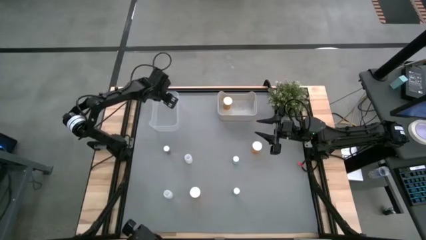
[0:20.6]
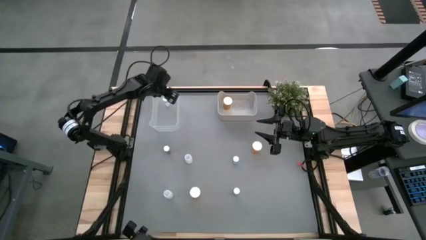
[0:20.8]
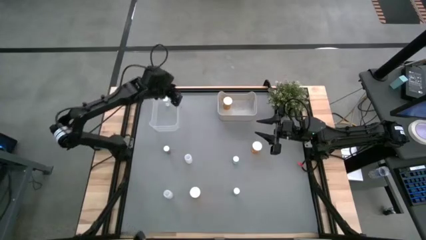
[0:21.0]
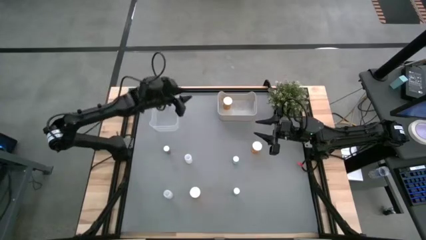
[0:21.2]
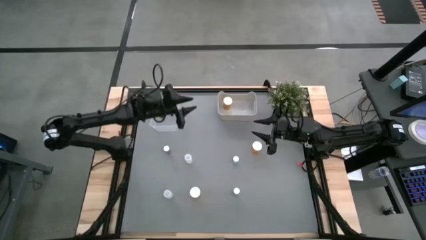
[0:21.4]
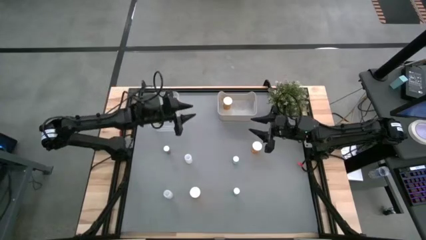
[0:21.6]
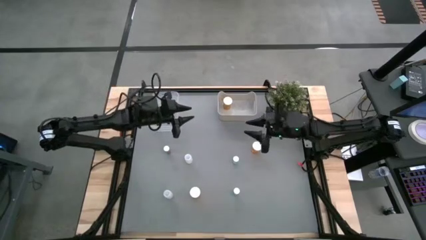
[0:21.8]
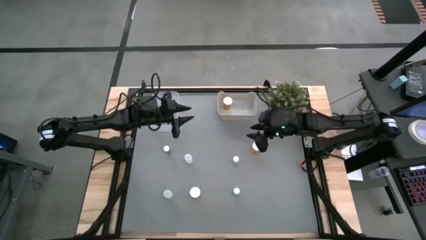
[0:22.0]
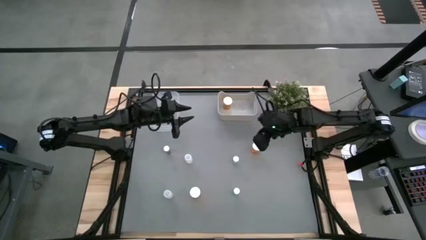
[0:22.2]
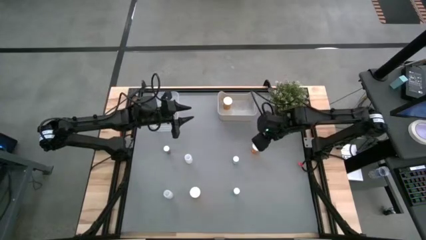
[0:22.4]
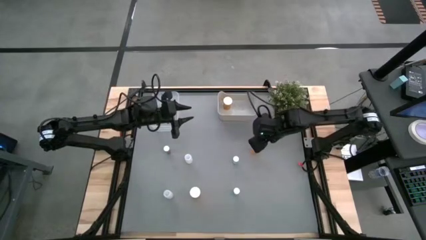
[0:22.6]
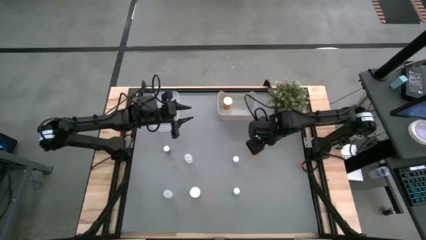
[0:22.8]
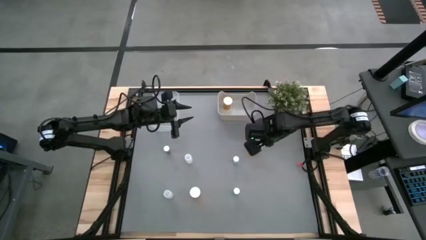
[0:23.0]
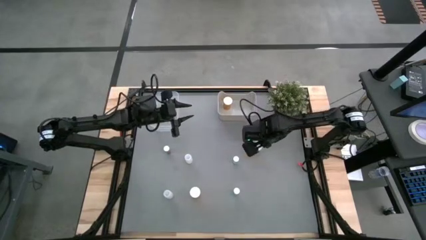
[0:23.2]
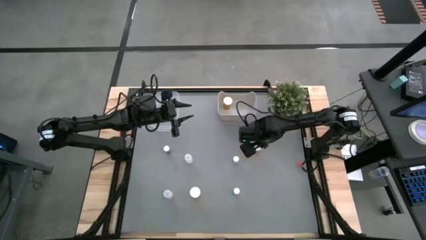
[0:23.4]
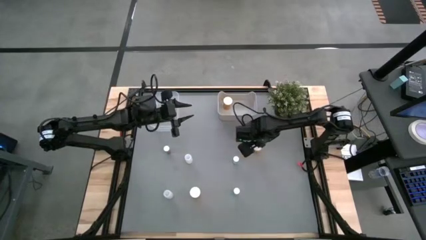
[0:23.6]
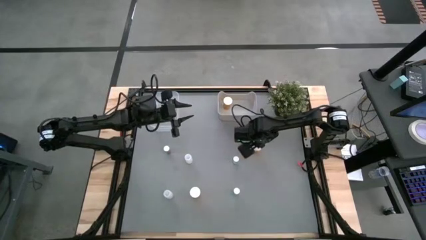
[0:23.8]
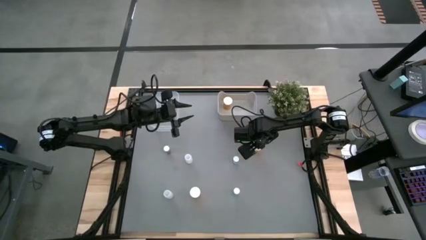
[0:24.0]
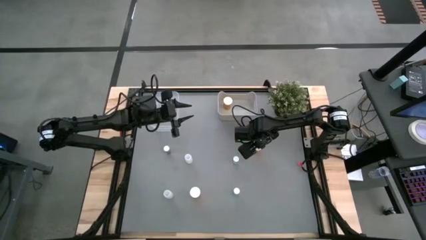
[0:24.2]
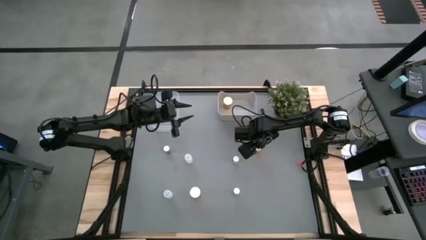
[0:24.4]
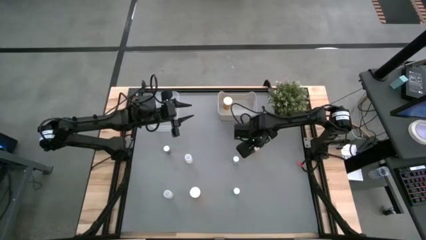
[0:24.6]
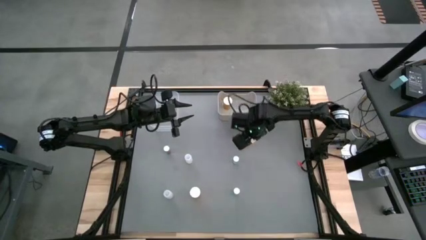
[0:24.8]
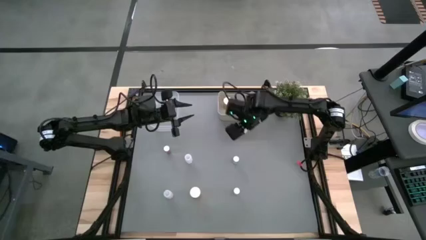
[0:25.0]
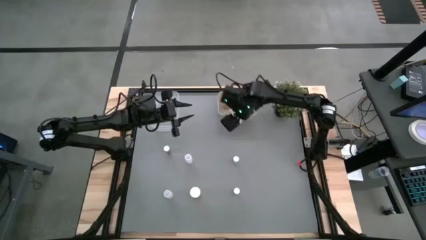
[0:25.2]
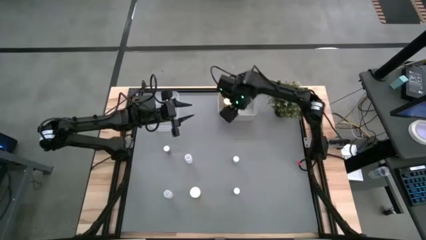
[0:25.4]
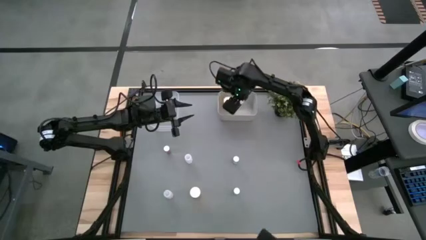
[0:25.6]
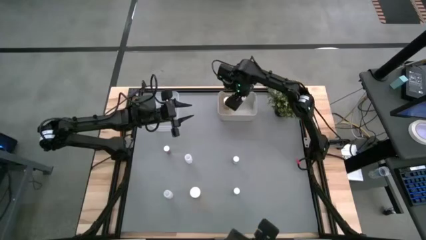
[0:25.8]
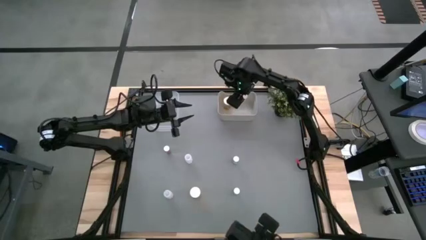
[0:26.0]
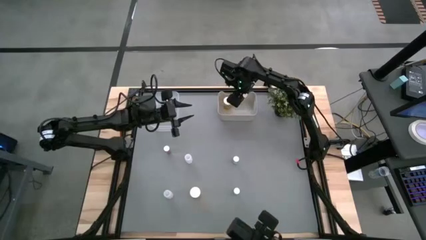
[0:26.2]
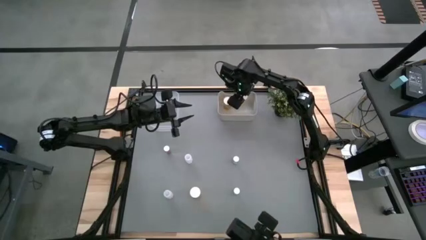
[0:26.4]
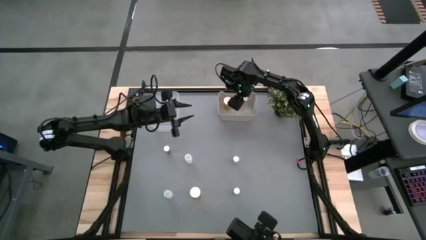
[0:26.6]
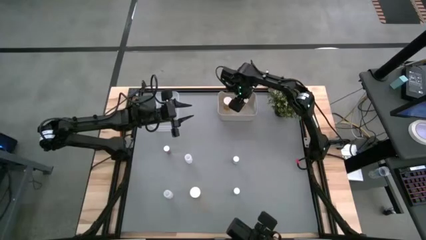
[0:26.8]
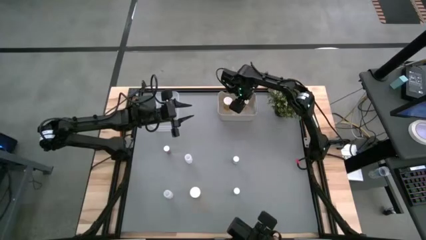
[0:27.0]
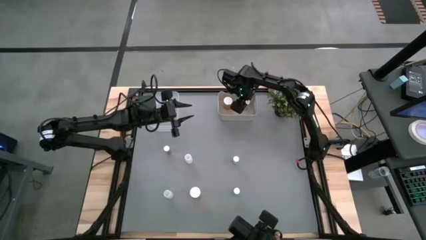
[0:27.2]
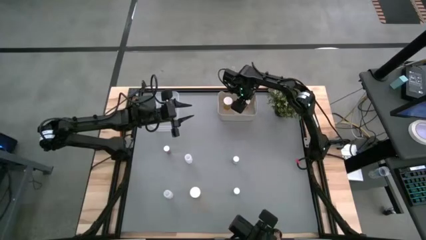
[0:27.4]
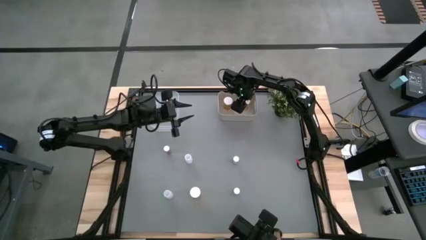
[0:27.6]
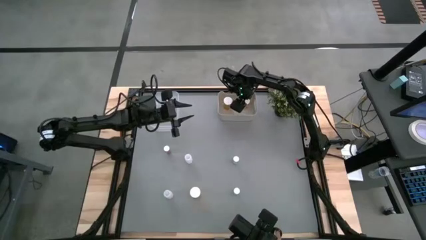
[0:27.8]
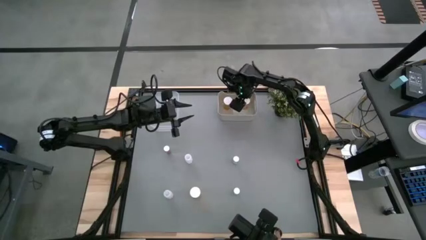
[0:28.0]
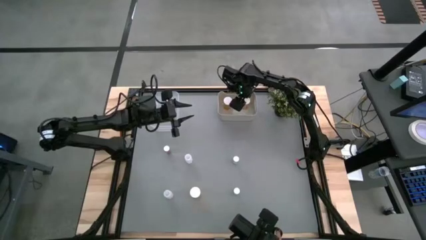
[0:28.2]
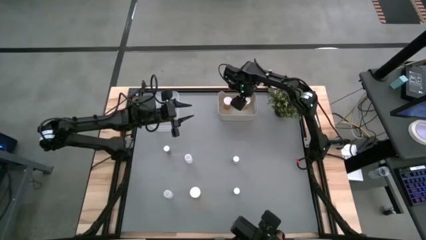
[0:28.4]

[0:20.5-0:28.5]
Task: Pick and place medicine bottles into bin by pill shape (circle, oval)
Put the top orange capsule bottle into the gray bin

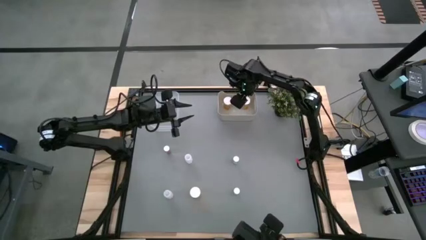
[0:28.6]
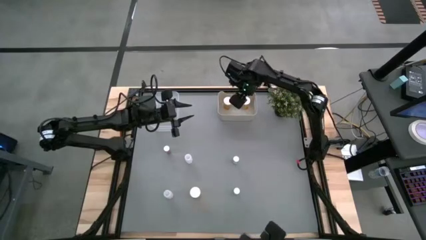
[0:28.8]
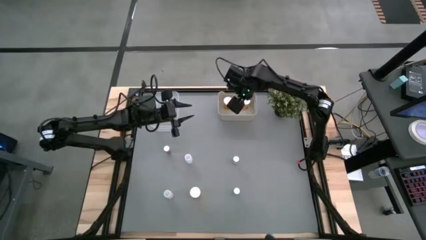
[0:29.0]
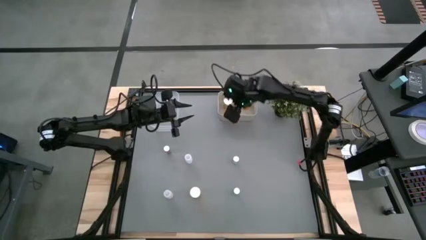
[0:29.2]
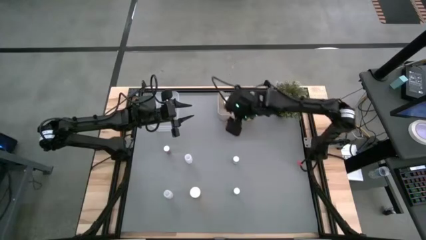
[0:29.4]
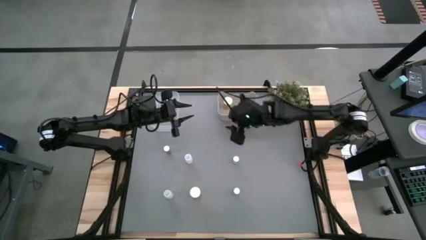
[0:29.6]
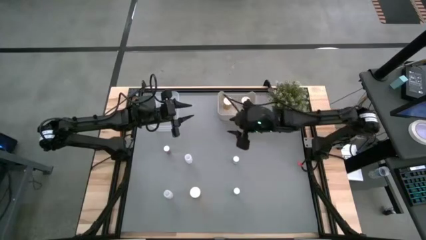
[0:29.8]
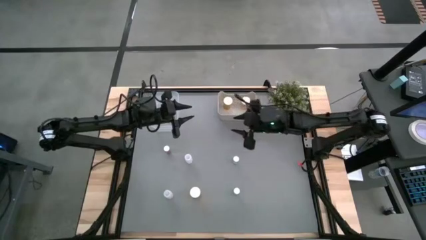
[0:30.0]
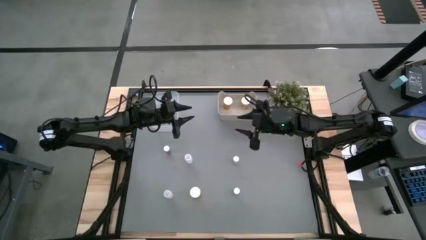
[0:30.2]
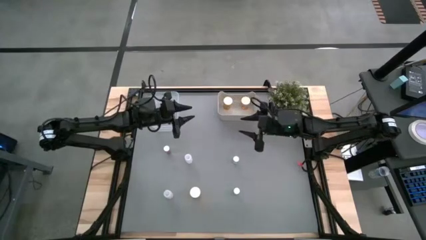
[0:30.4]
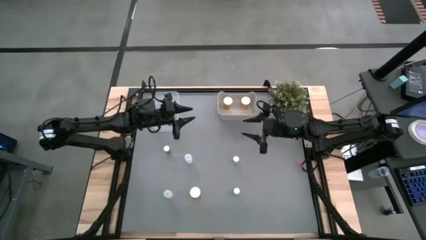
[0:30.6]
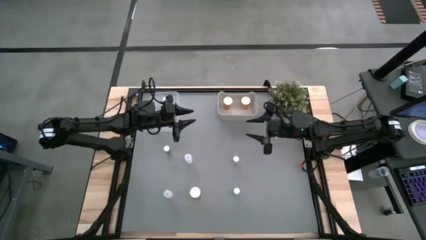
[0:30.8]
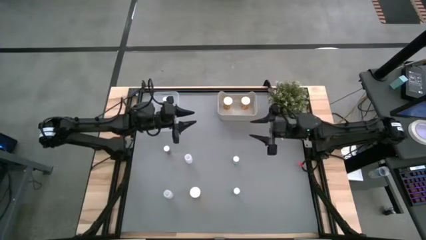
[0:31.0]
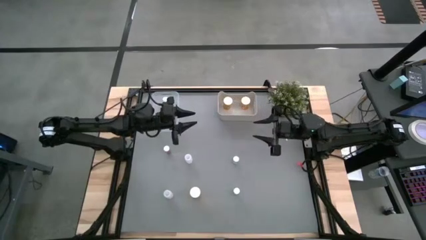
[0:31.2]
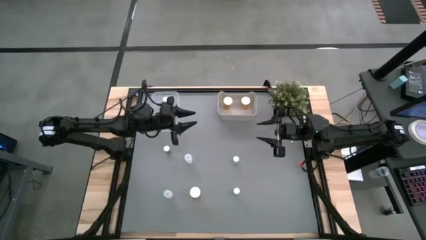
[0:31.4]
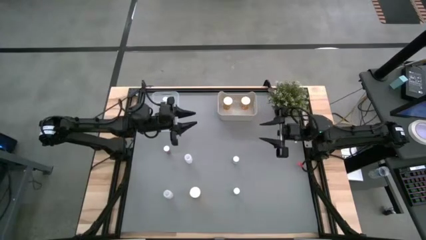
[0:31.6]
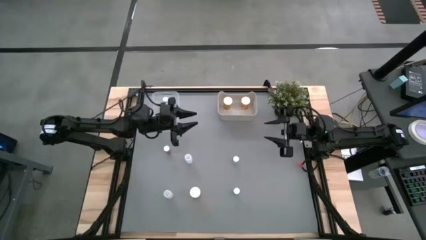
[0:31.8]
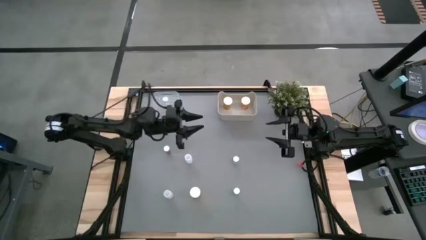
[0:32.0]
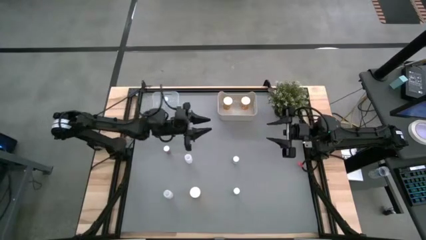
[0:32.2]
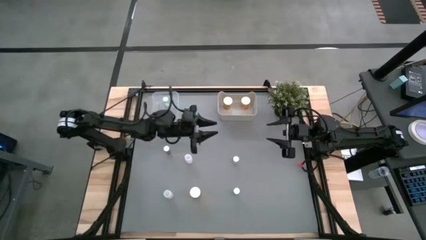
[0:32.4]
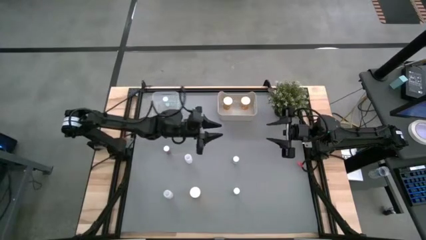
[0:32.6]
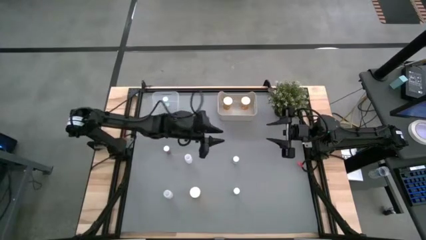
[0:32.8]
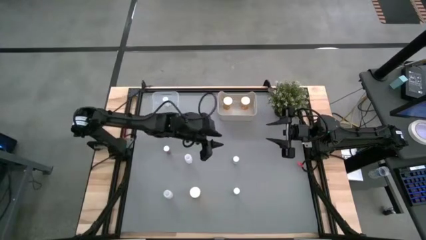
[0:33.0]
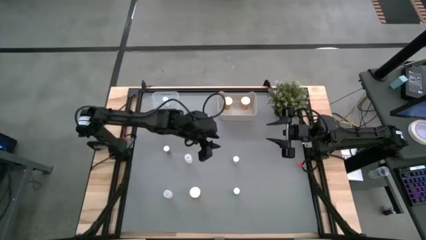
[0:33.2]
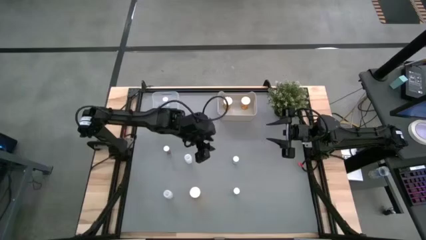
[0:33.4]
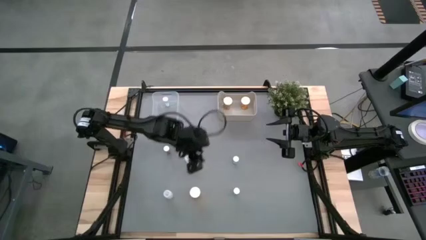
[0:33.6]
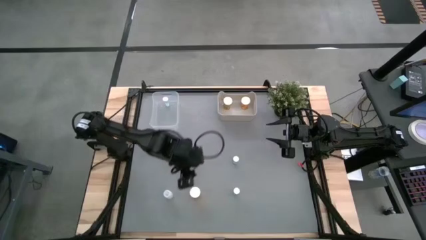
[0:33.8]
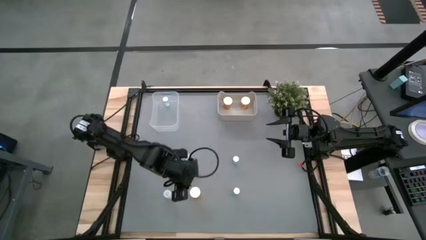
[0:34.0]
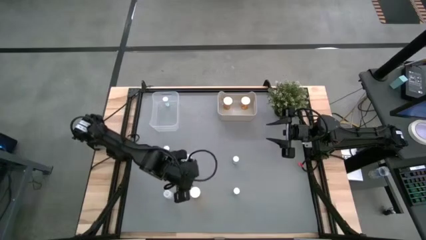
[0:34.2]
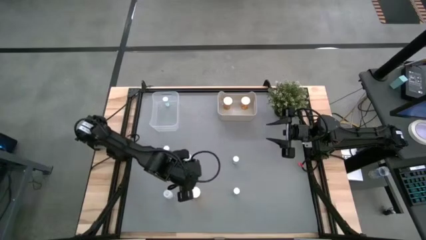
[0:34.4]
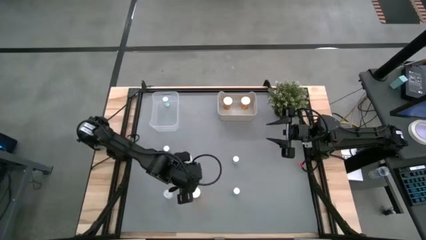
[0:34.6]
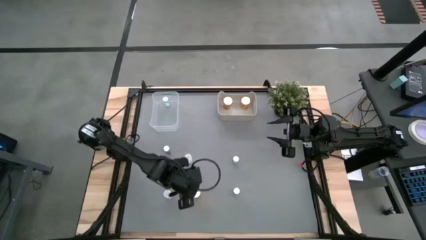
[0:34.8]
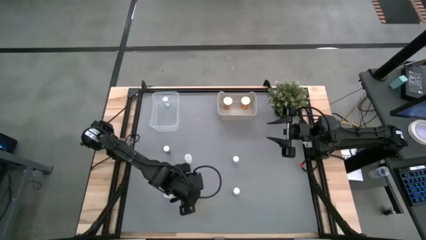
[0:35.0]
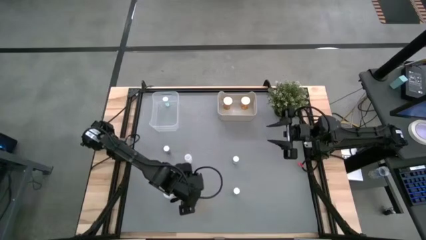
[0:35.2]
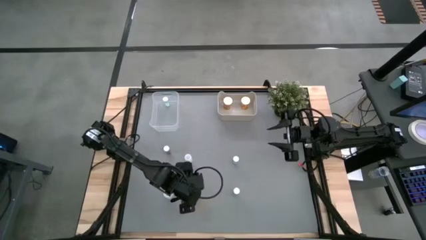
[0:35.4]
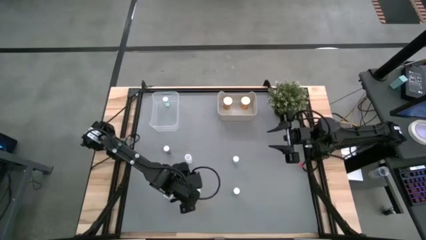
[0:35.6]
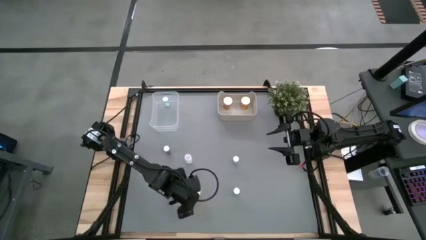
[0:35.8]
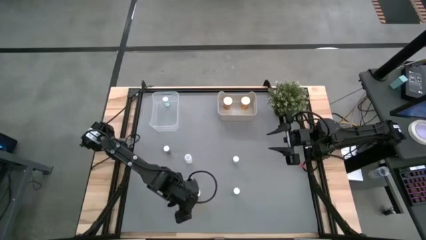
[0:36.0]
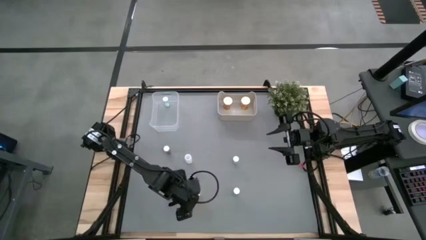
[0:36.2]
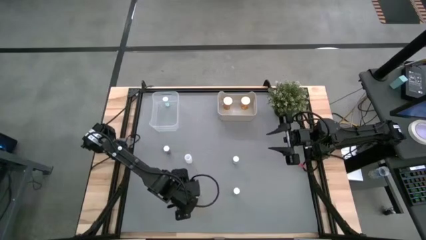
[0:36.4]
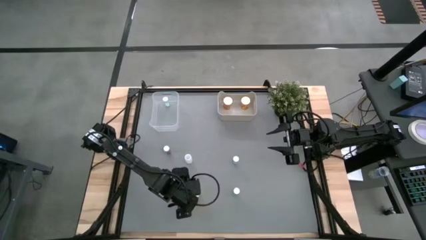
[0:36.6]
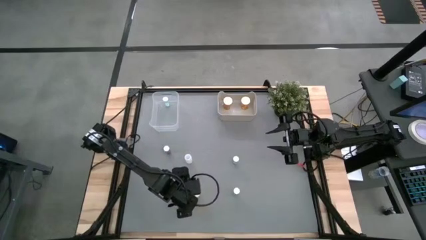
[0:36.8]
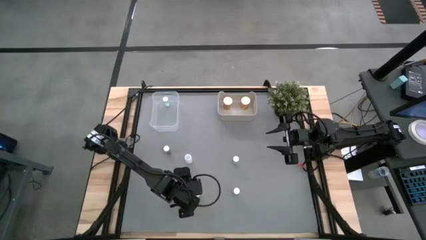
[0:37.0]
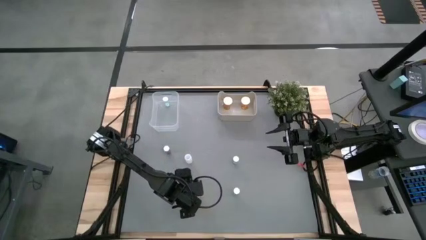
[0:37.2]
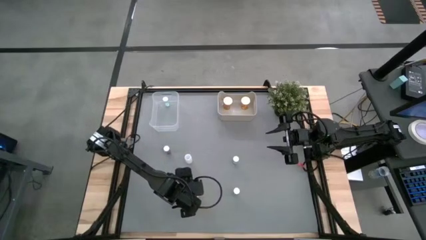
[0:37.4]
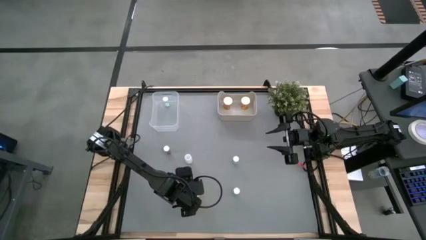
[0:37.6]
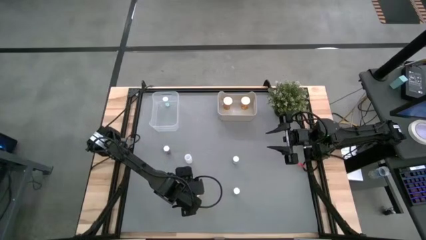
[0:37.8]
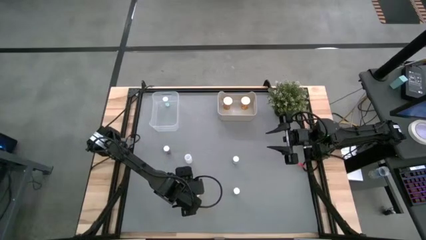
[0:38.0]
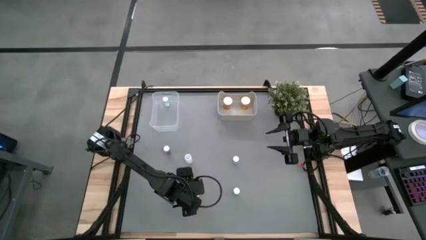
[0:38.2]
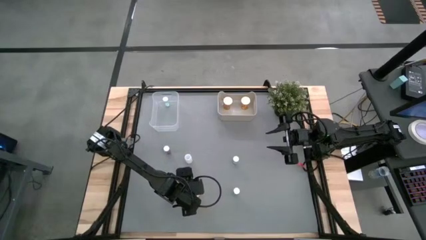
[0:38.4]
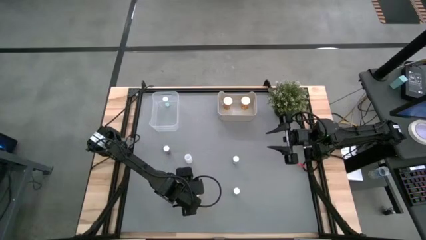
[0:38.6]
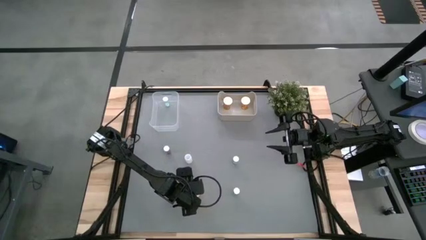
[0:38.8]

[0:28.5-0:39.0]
Put the orange capsule bottle into the gray bin
